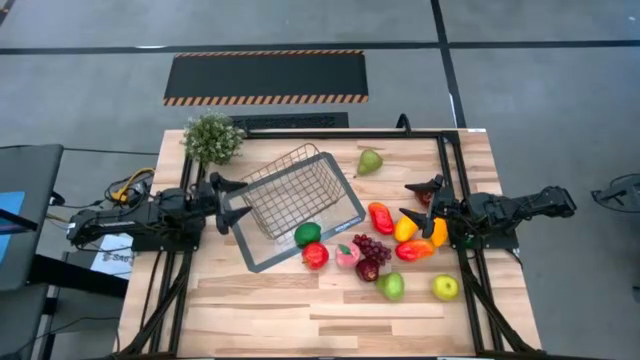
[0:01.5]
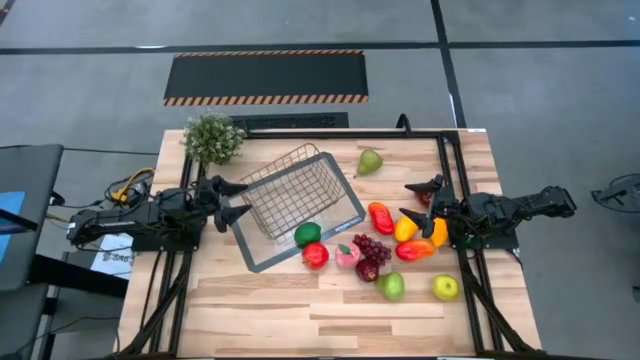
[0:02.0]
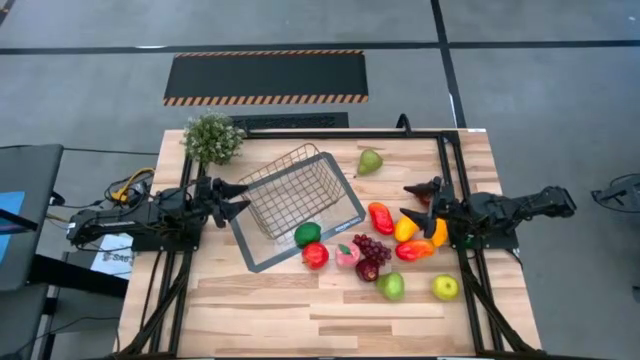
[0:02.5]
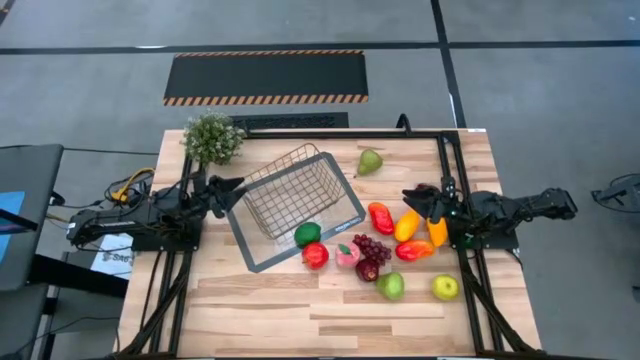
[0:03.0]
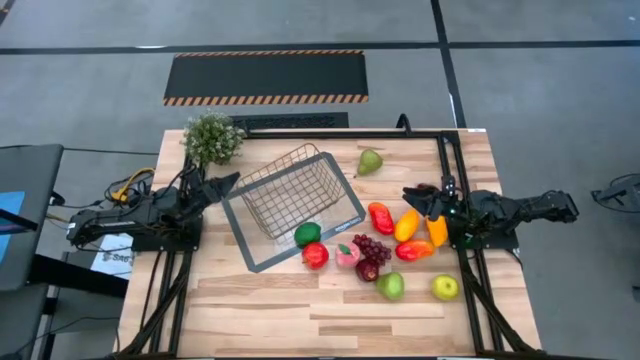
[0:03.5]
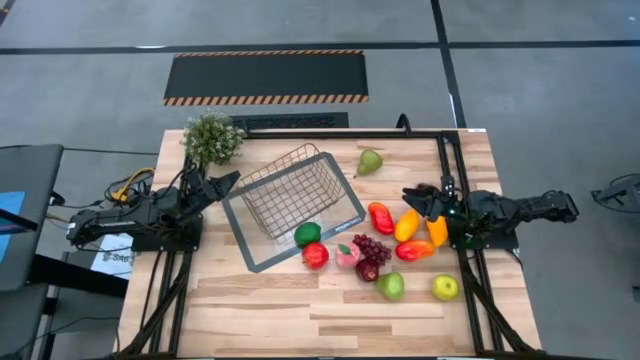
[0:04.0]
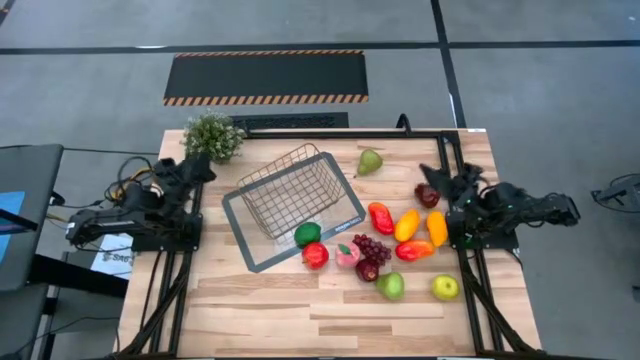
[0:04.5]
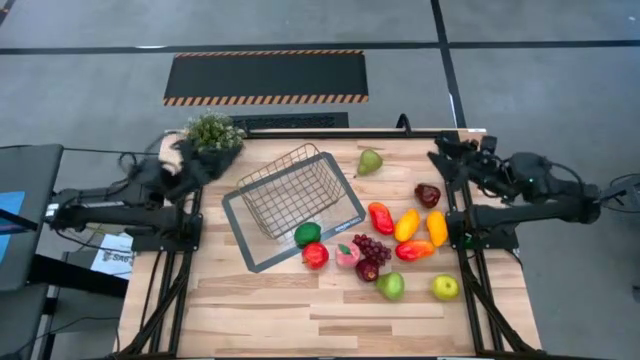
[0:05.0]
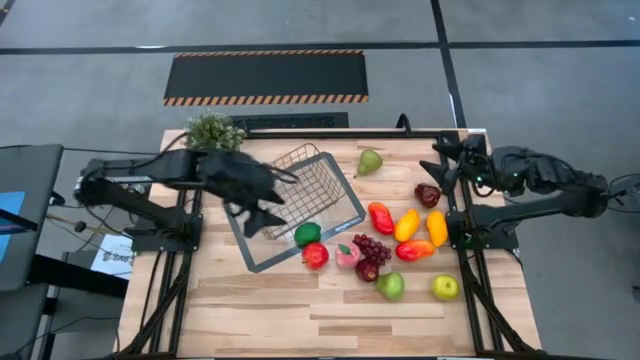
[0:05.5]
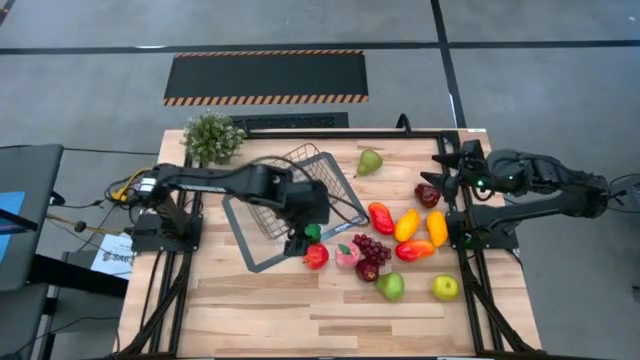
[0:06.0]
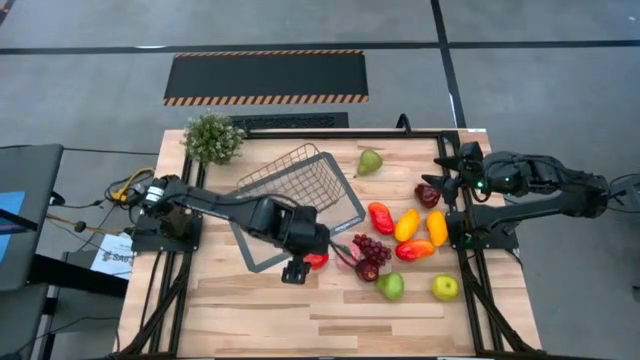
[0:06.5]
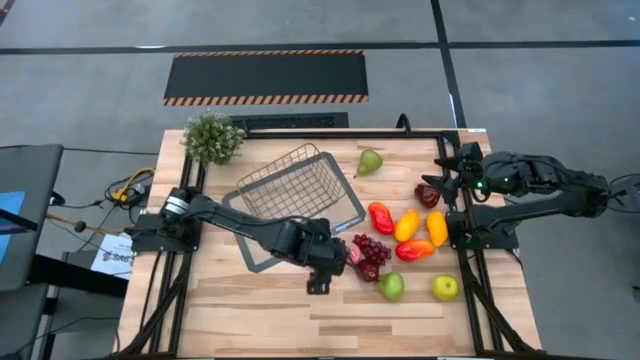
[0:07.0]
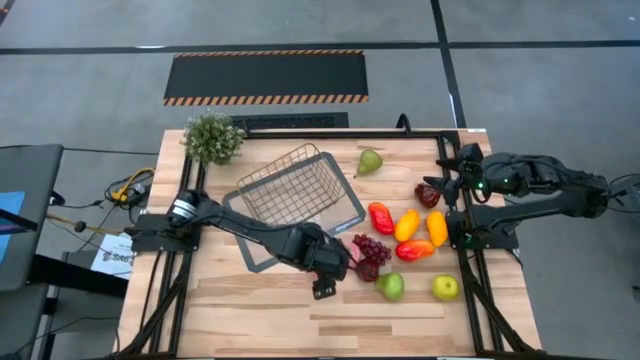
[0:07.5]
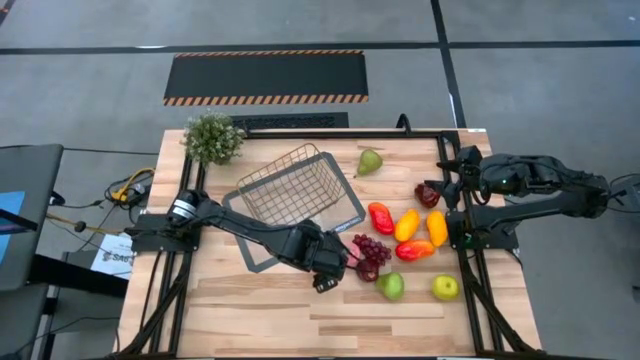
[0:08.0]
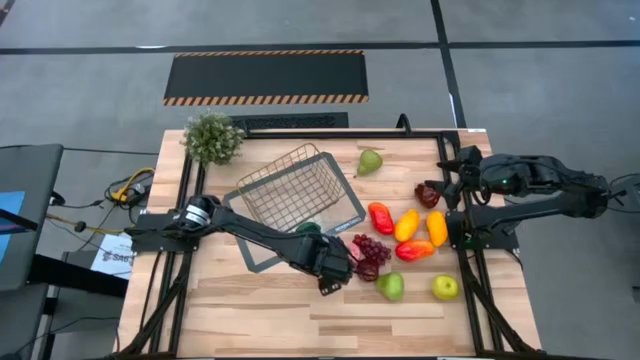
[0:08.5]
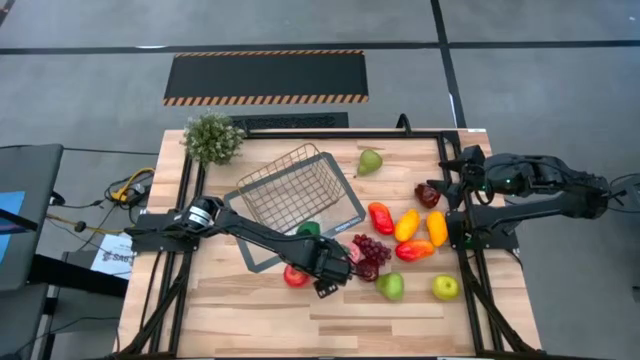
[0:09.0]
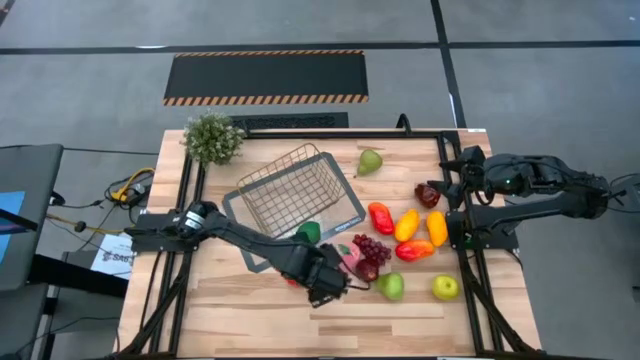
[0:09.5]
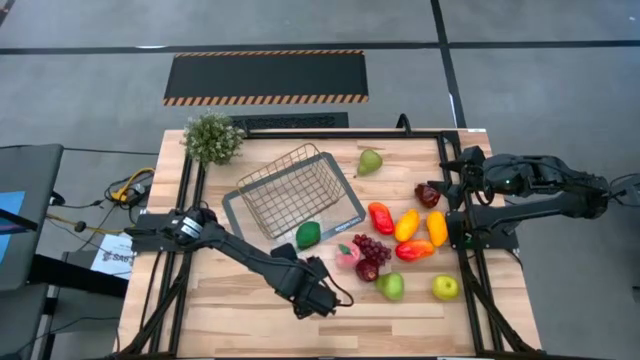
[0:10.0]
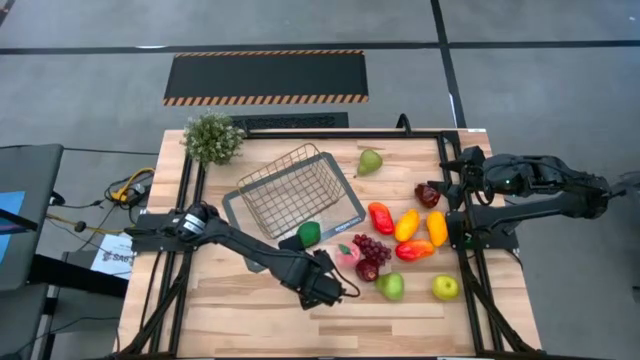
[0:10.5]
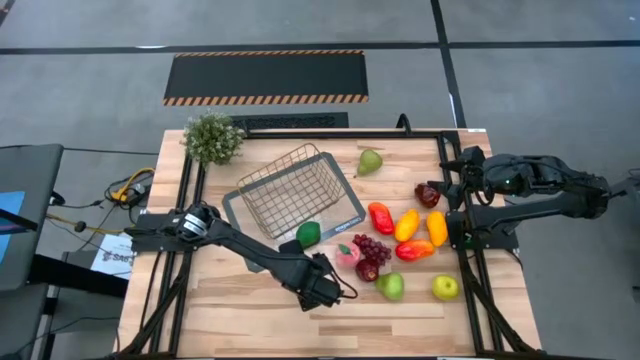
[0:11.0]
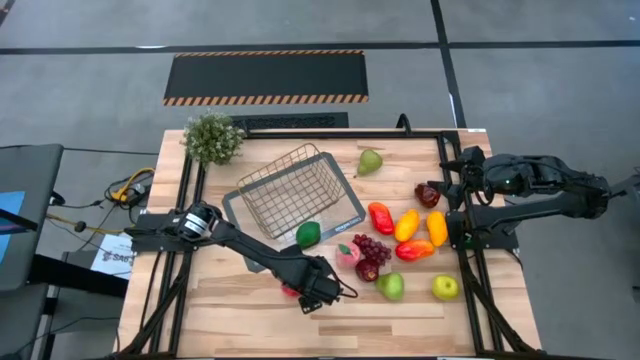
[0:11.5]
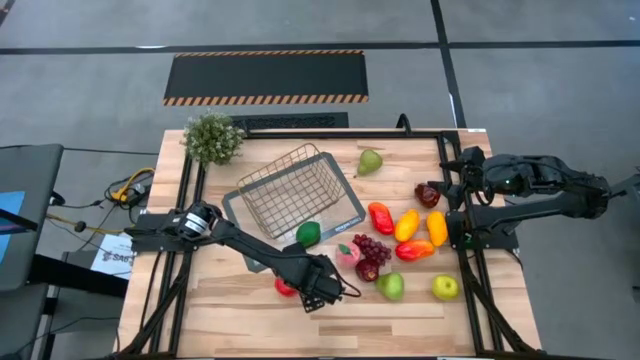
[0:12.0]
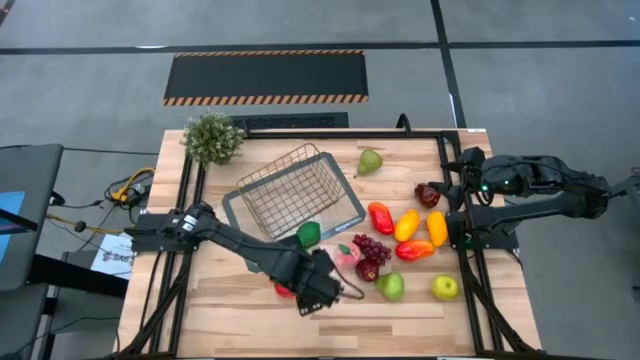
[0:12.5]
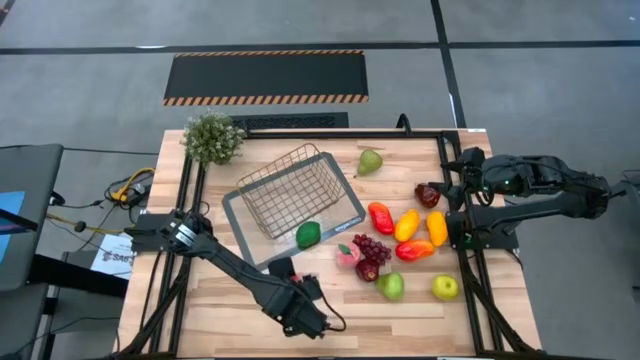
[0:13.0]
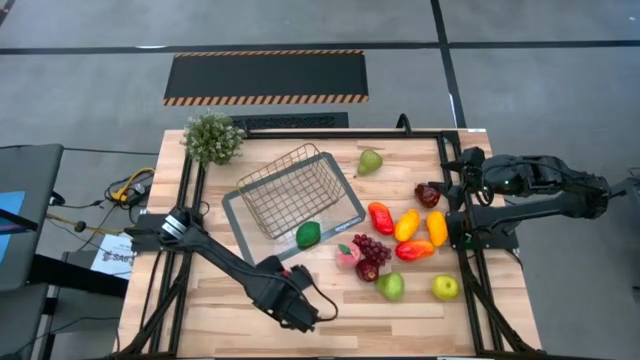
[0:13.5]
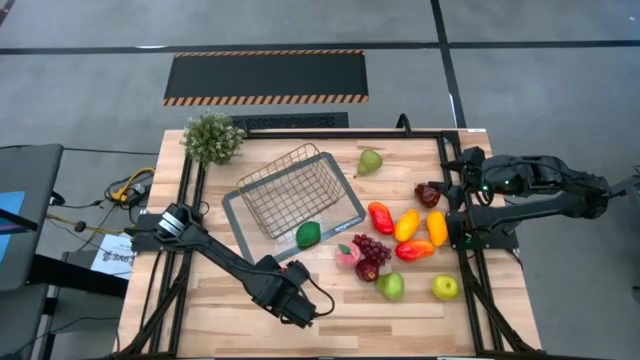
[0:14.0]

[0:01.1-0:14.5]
Task: Build produce basket
Put the red apple into the gold wire basket

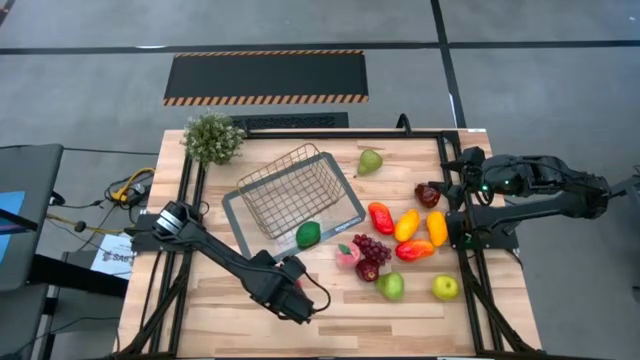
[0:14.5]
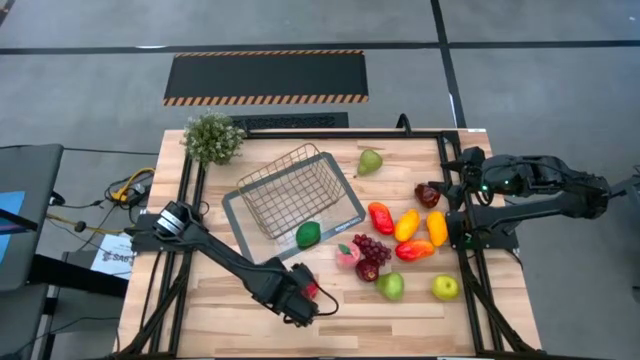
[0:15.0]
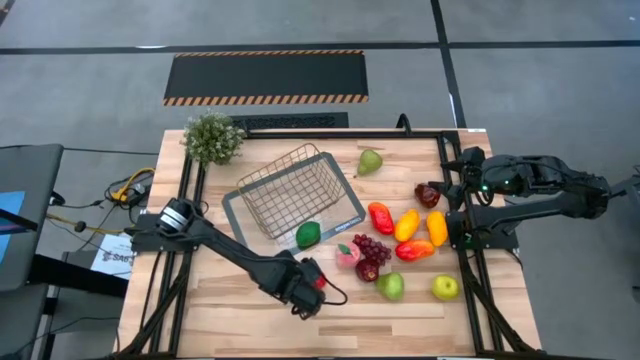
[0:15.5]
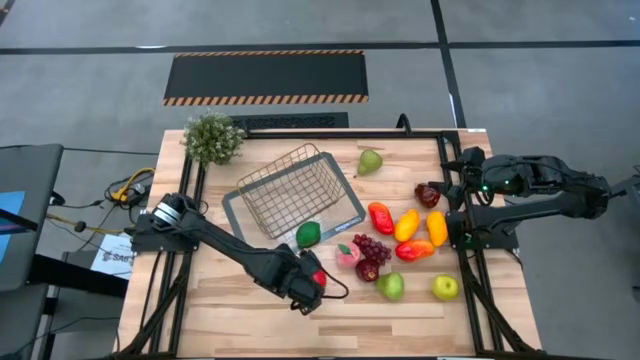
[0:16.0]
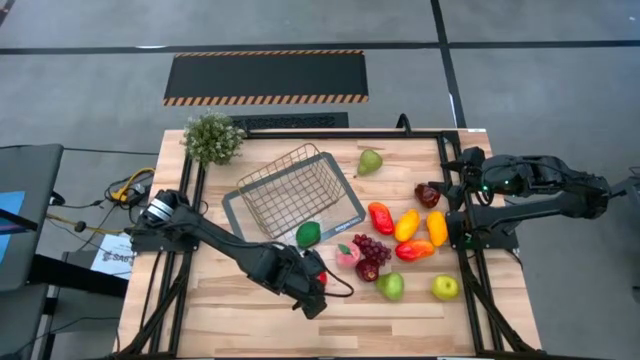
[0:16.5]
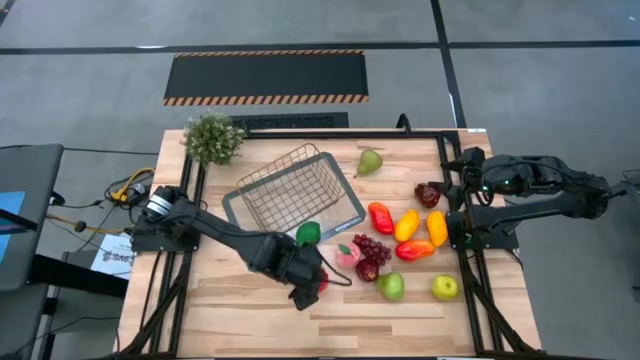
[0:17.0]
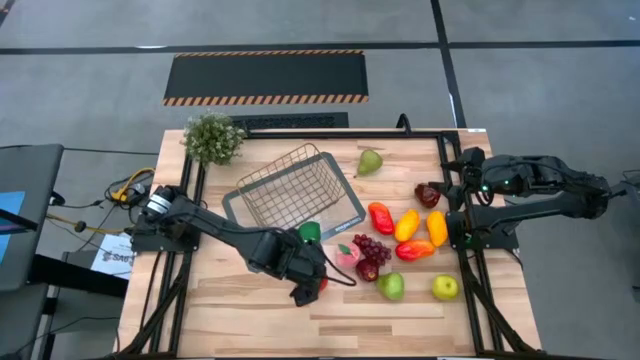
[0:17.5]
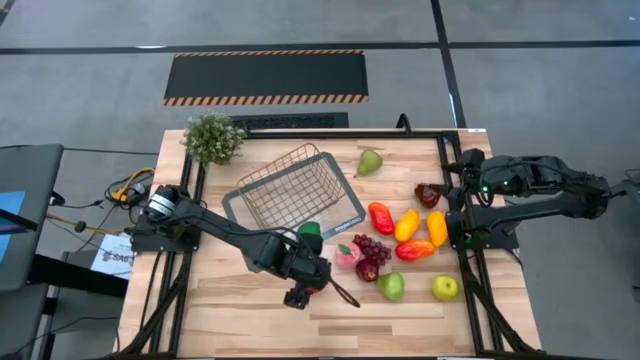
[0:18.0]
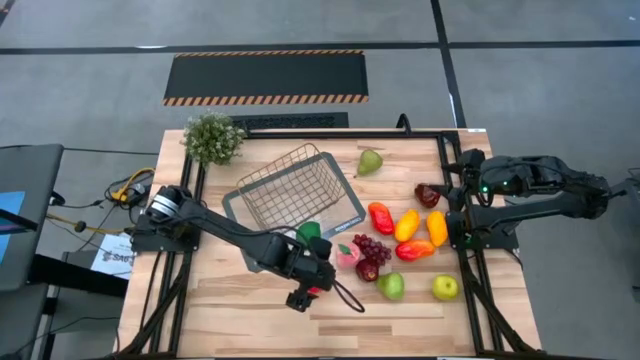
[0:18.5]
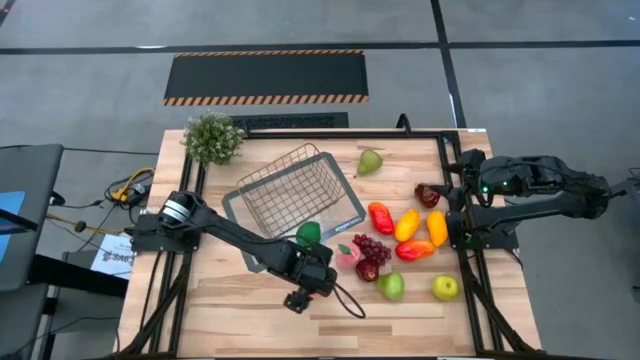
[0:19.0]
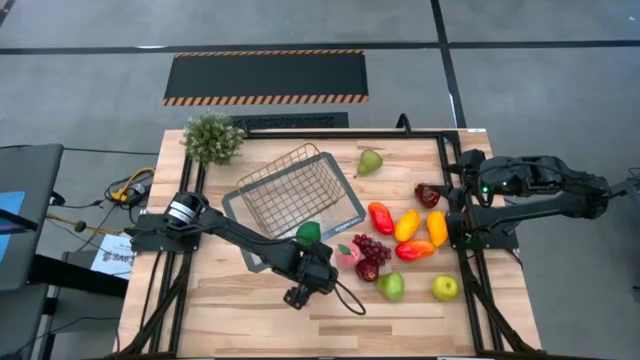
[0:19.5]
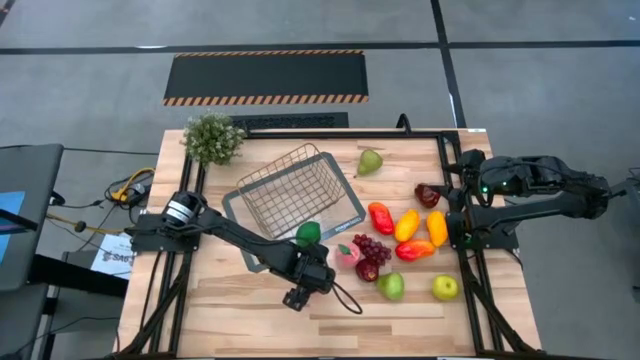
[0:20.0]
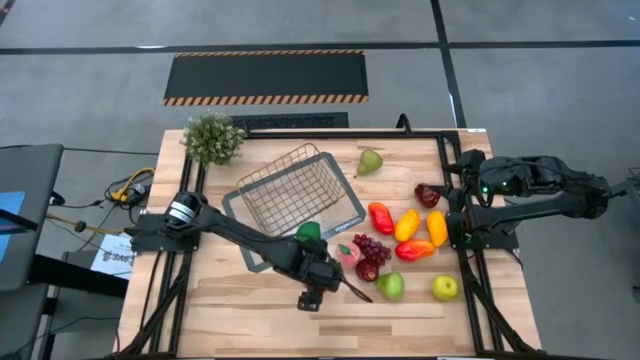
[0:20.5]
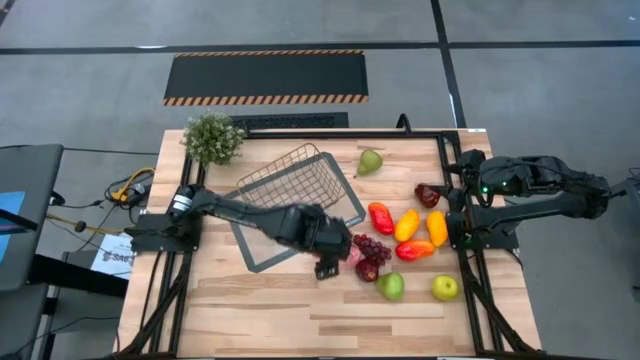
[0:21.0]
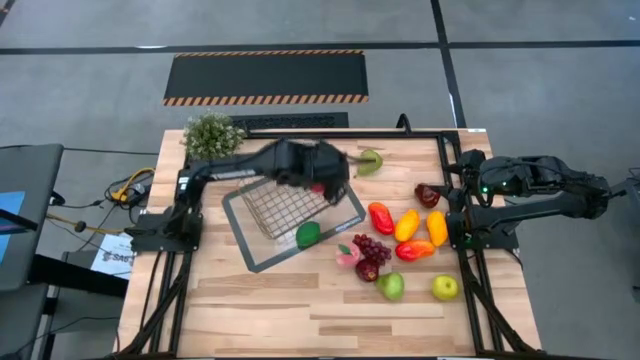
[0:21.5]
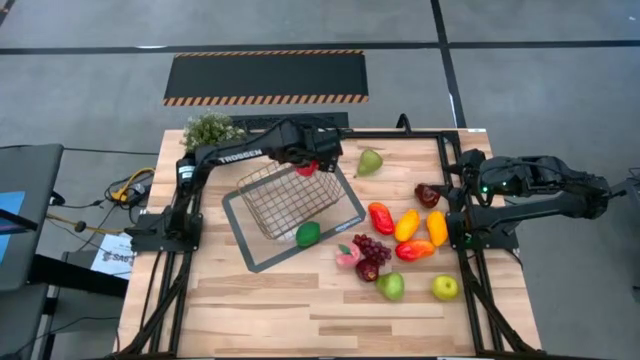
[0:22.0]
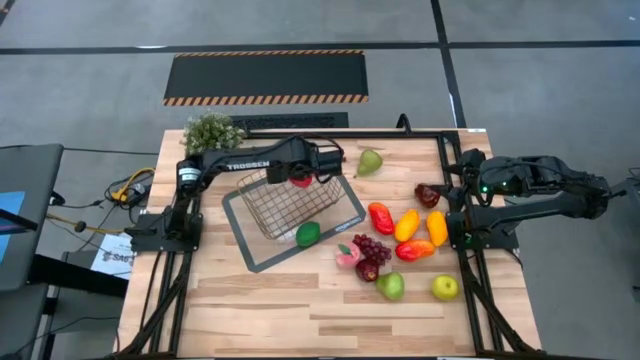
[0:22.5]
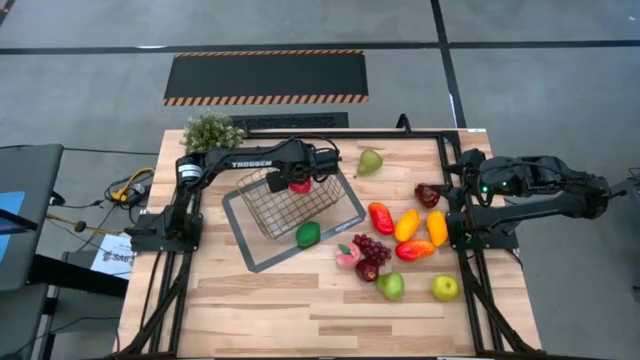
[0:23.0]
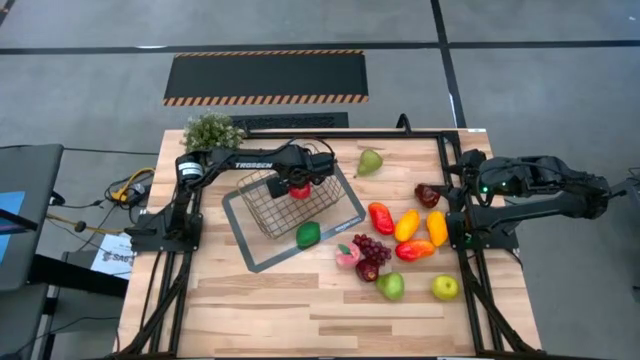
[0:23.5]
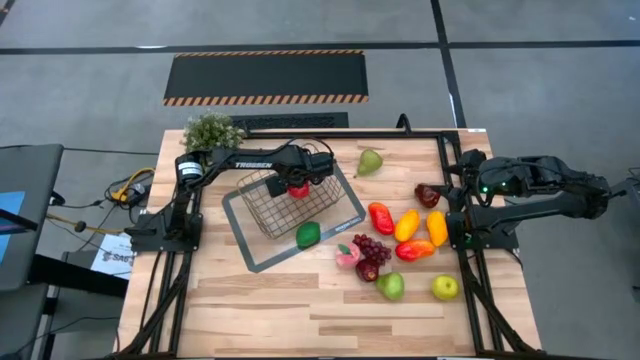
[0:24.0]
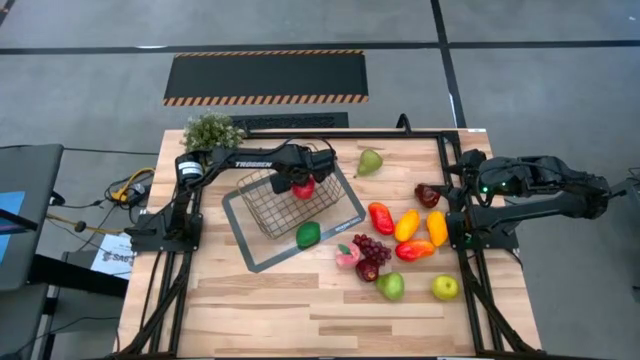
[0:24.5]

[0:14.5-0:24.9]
Put the red apple into the gold wire basket
